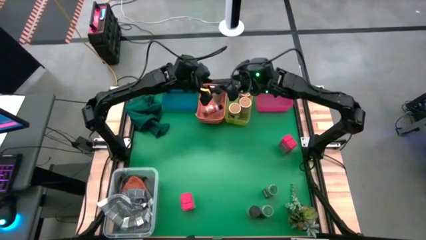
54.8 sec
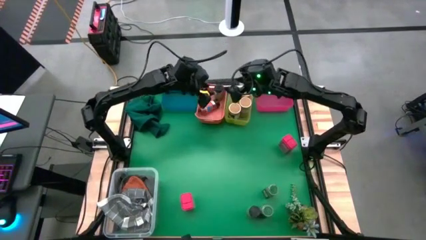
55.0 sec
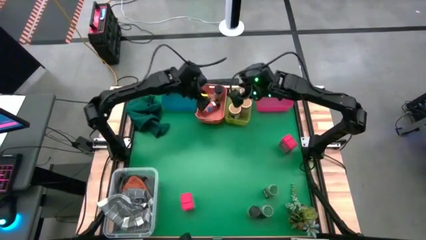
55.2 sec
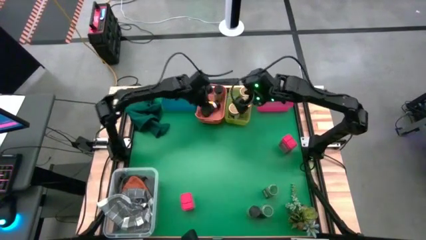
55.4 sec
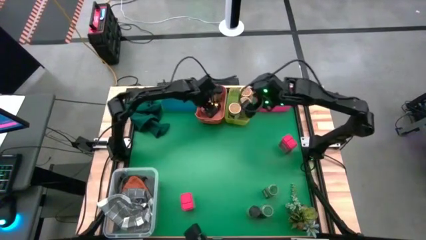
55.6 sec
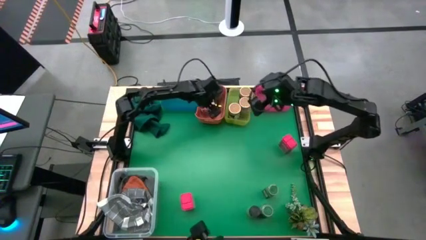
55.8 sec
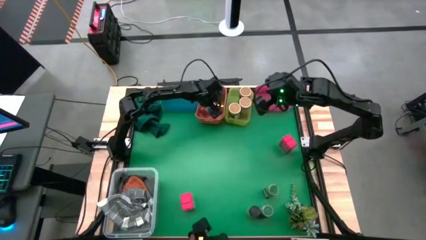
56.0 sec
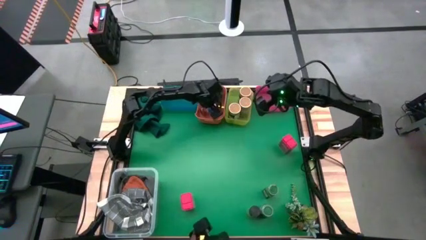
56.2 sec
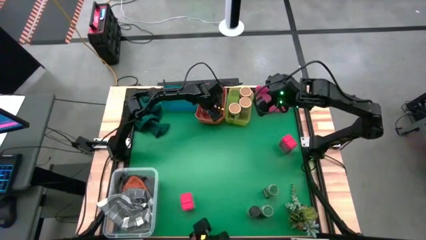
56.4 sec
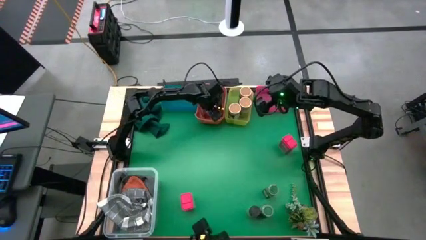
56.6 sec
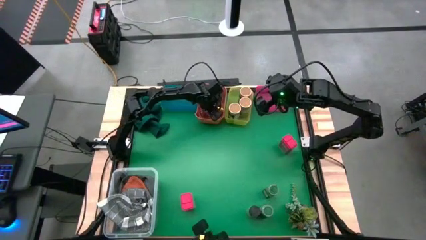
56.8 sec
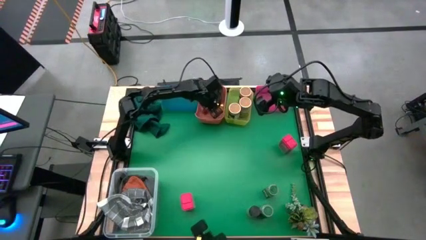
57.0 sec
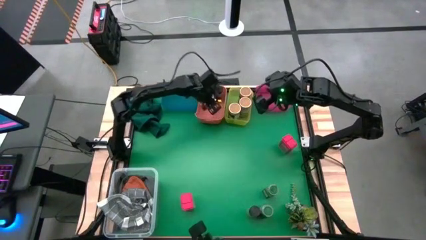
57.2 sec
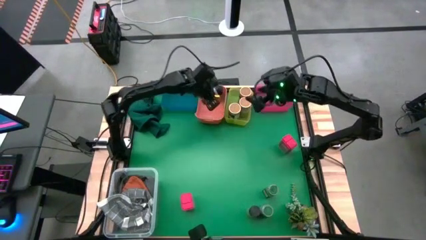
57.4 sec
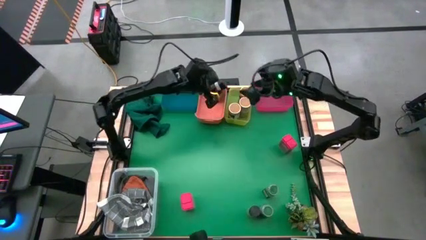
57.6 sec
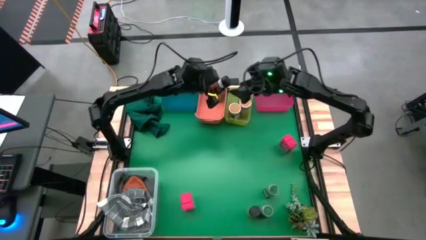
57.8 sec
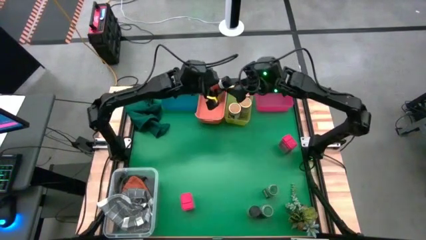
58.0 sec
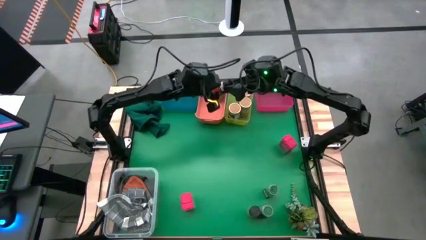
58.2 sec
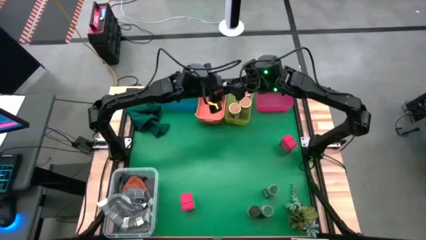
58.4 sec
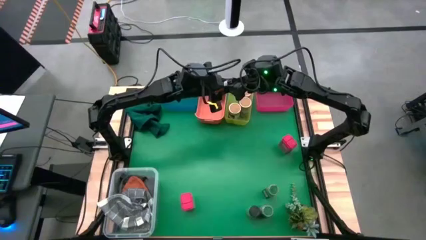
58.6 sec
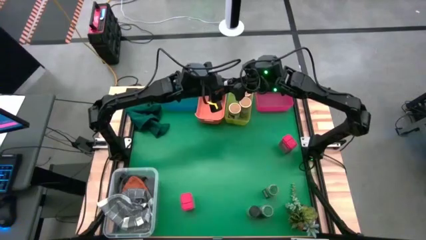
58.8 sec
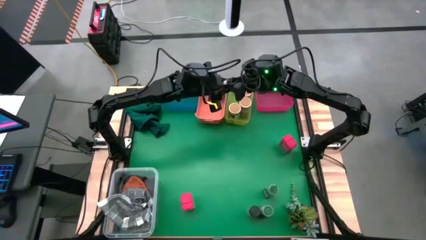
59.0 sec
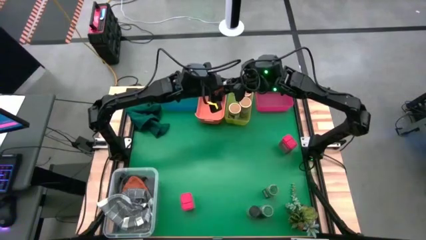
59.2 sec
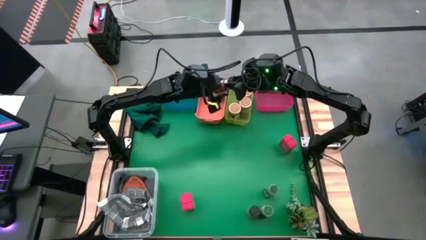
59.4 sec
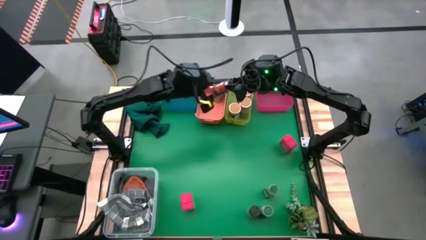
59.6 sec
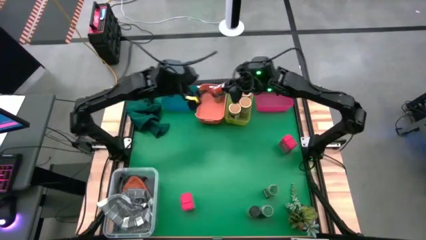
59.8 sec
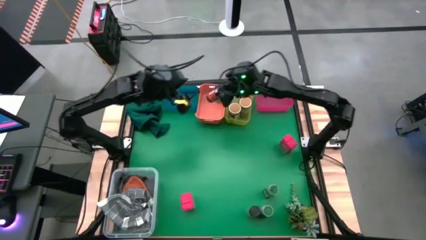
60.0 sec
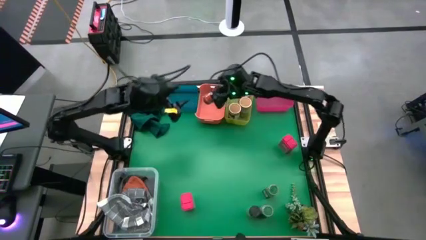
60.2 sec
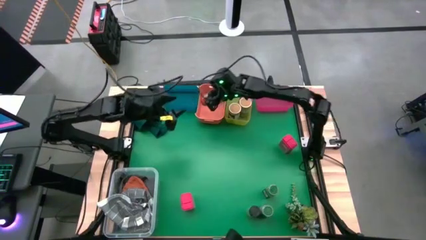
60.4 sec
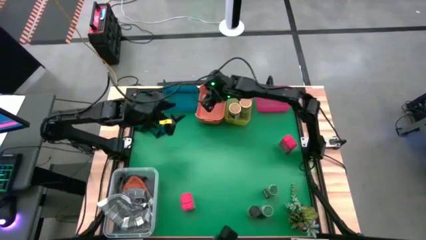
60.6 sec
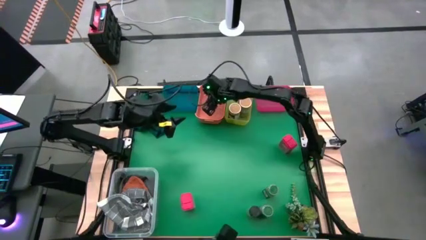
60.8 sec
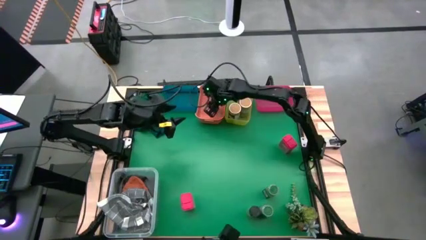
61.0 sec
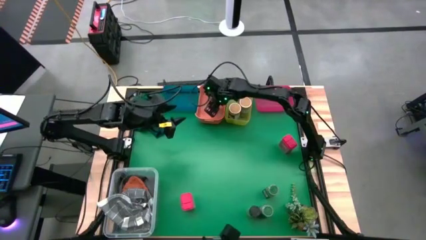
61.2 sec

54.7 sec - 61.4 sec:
Task: Sort spices by type
Put the left black seasoning bottle into the orange bin

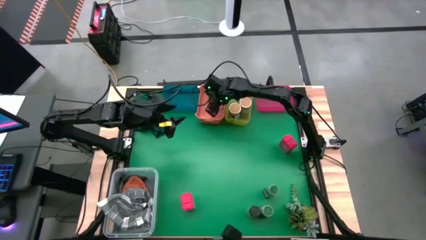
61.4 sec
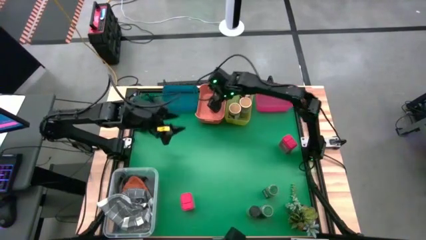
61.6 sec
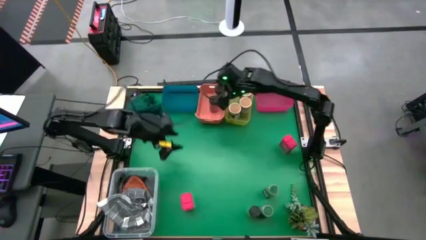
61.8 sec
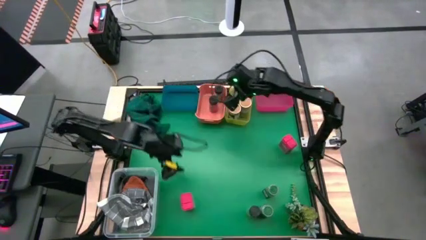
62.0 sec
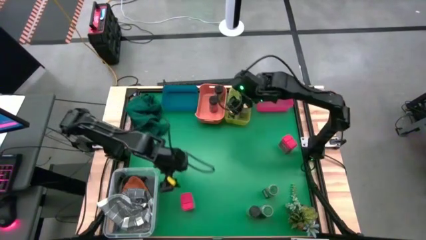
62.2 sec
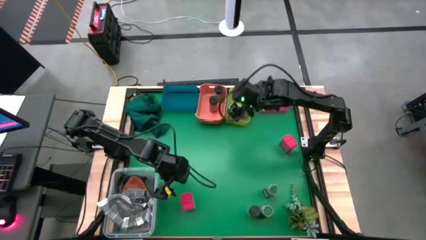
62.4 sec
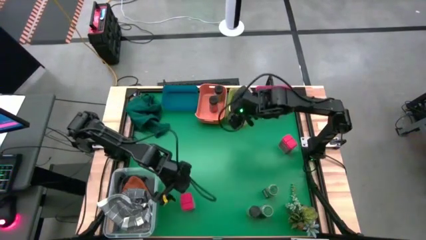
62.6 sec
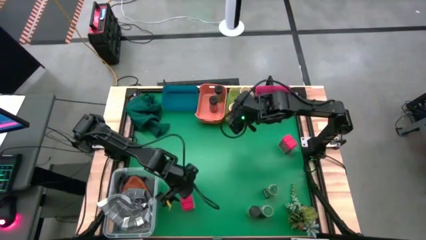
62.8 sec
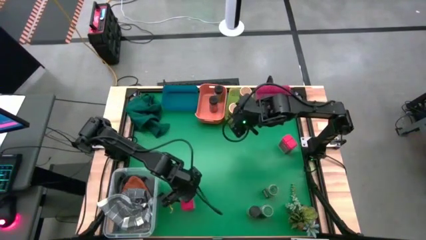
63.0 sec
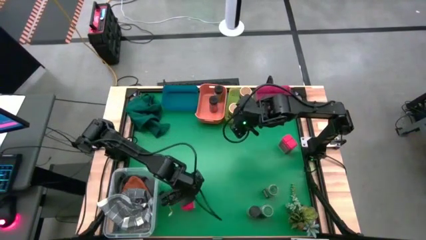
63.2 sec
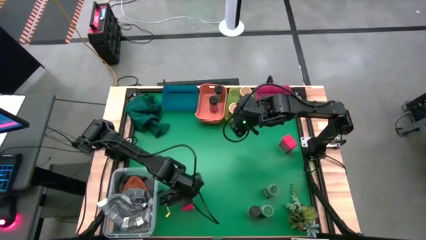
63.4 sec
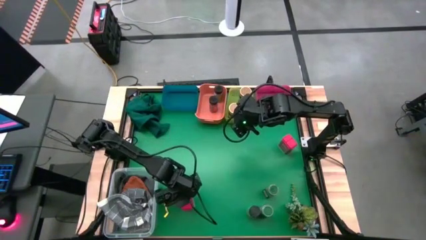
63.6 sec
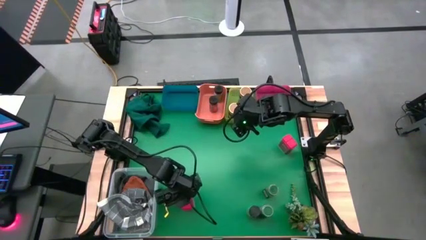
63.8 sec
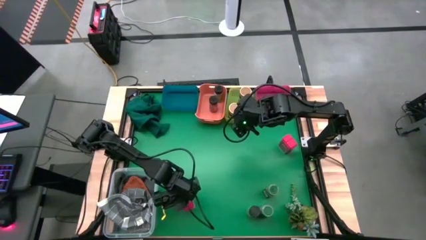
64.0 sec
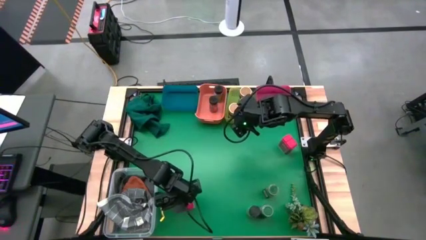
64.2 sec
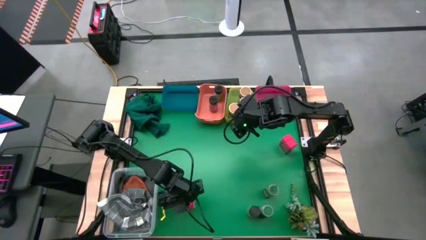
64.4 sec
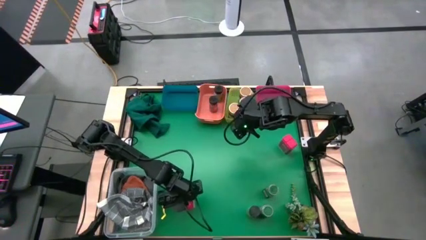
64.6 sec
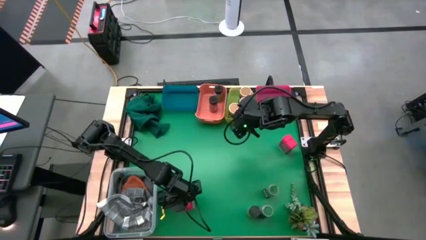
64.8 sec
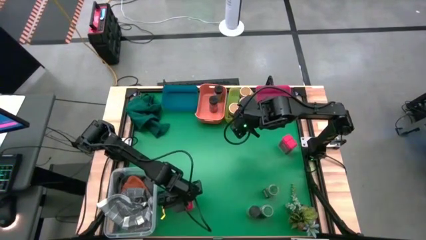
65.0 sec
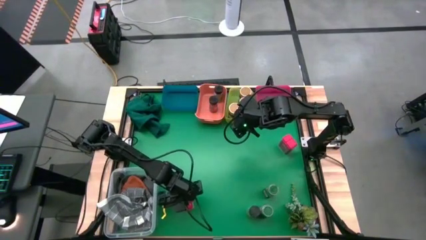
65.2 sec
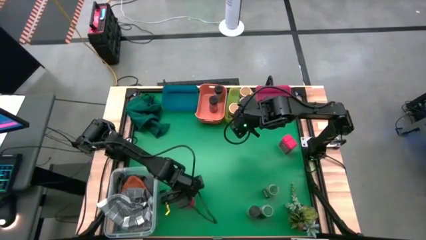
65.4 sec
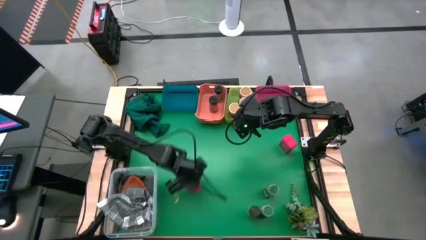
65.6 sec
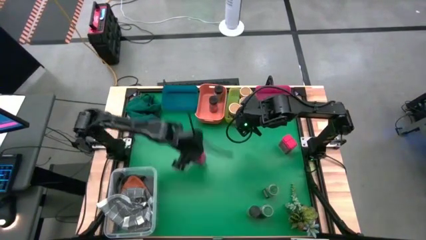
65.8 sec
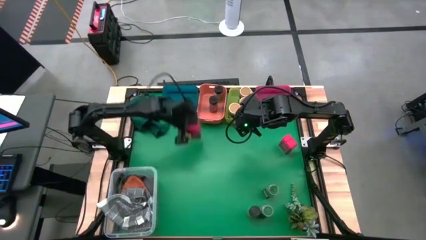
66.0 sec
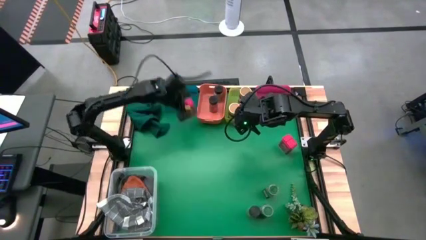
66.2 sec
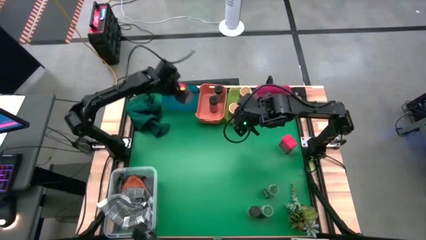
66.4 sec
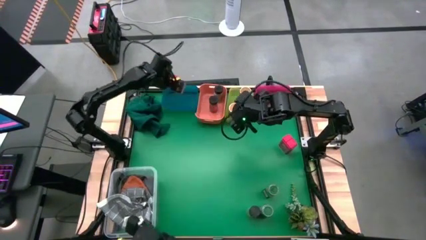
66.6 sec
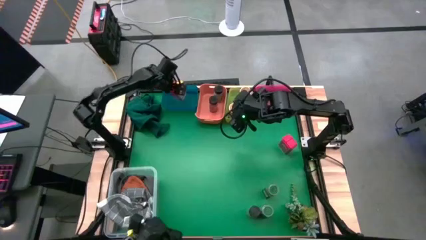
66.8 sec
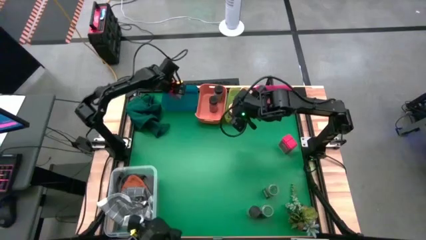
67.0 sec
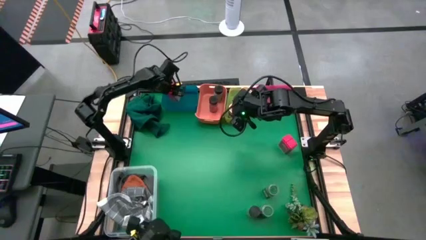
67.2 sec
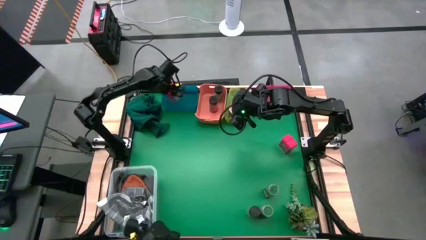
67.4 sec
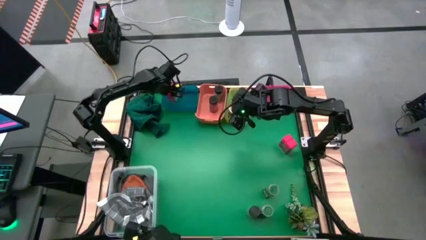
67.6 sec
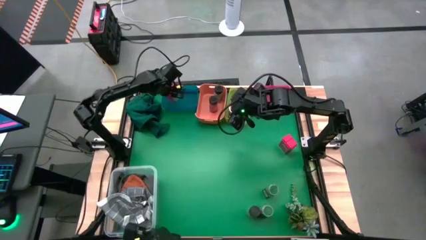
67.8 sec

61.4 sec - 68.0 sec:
Put the bottom red seasoning bottle into the blue bin

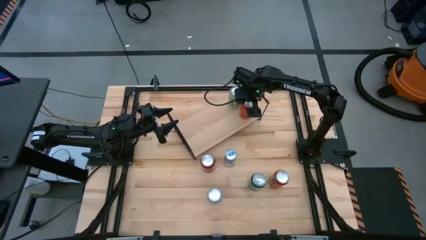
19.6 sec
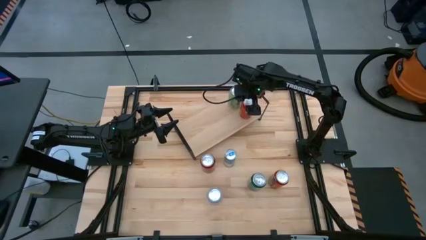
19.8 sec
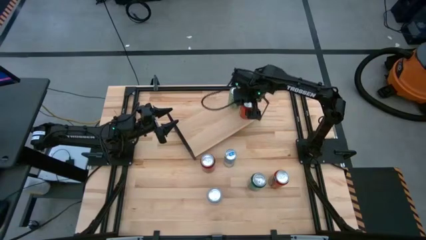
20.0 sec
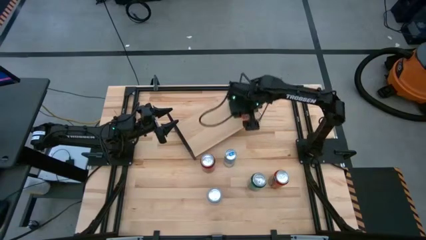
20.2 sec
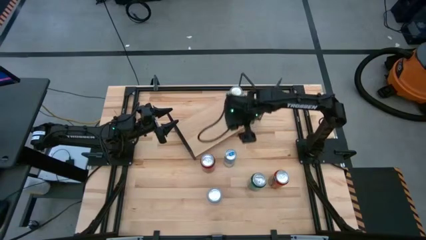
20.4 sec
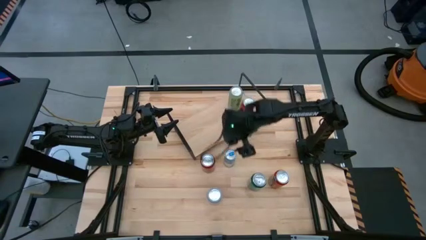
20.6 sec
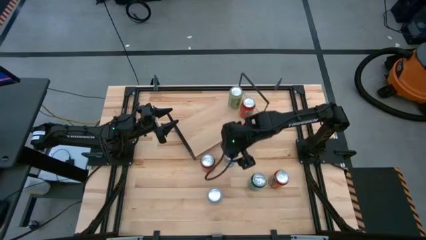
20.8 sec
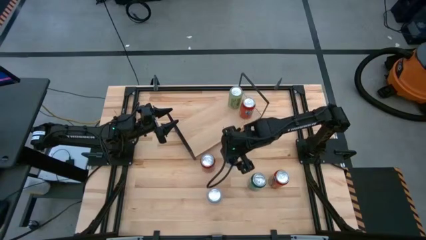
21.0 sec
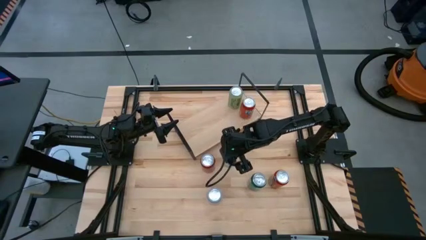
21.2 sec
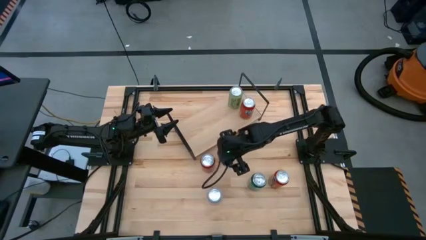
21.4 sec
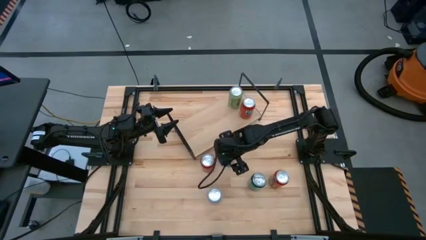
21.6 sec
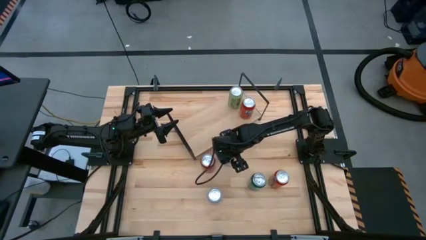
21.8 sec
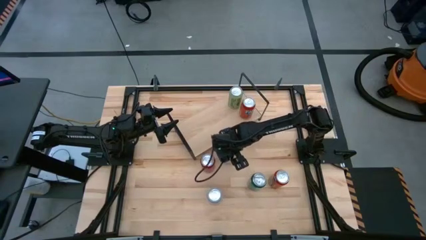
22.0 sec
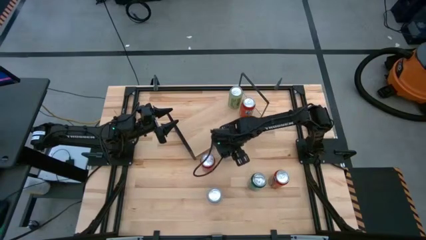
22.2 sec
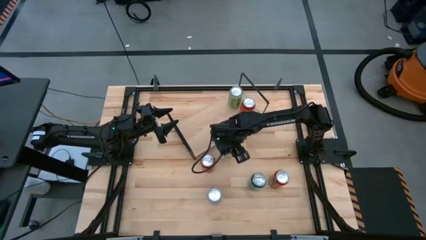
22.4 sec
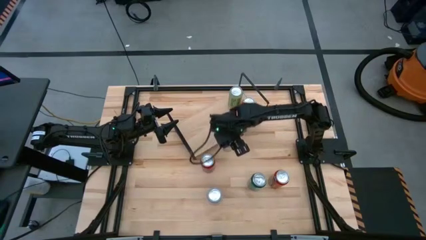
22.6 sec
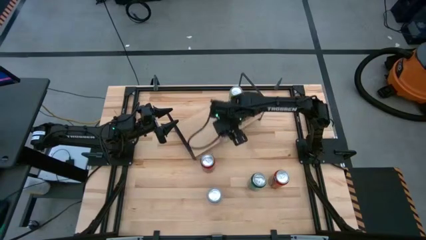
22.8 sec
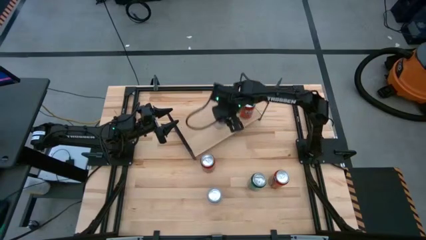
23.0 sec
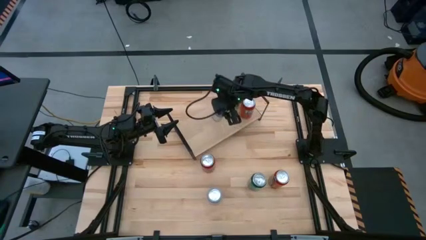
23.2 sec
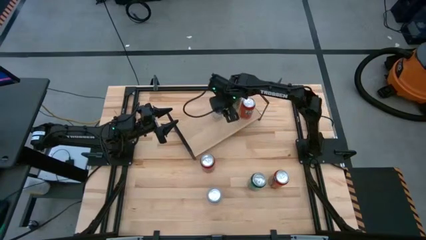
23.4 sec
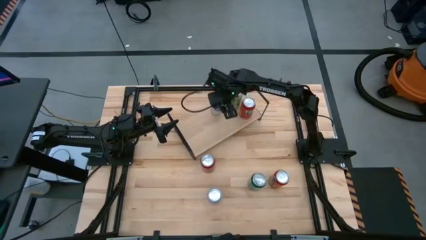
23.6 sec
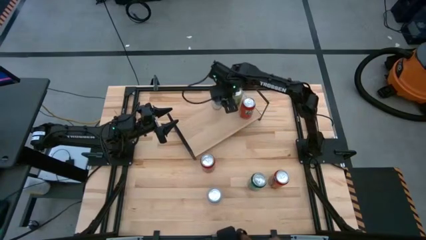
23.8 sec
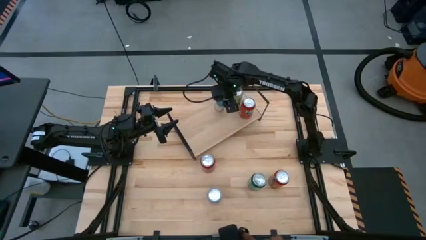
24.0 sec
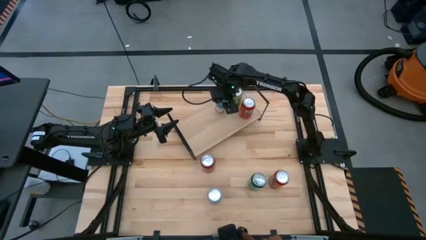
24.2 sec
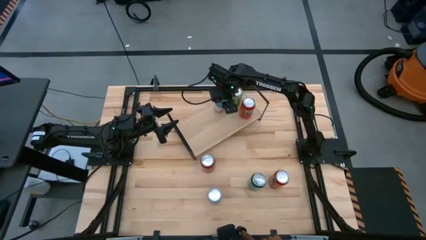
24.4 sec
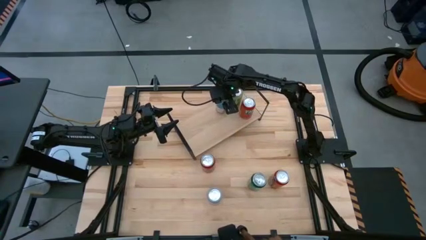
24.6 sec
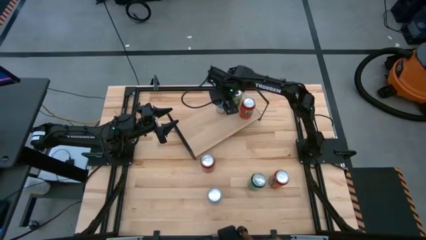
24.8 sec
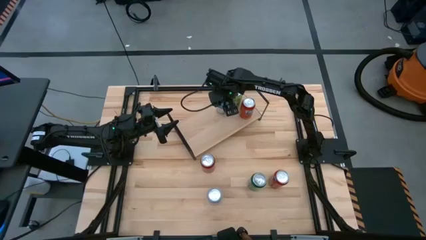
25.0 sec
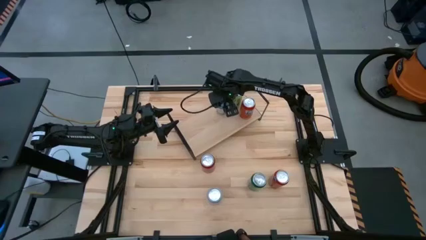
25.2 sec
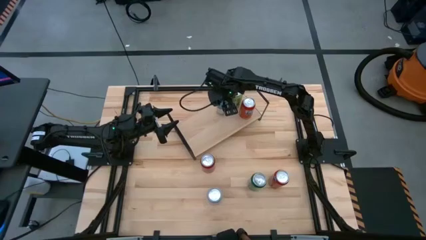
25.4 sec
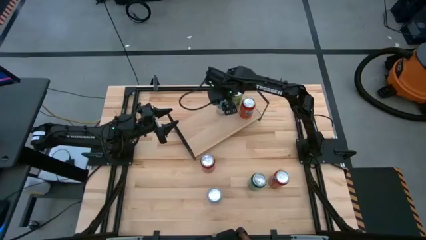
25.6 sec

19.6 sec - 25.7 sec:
Task: Place canned beverage on shelf
Put the blue soda can on the shelf
